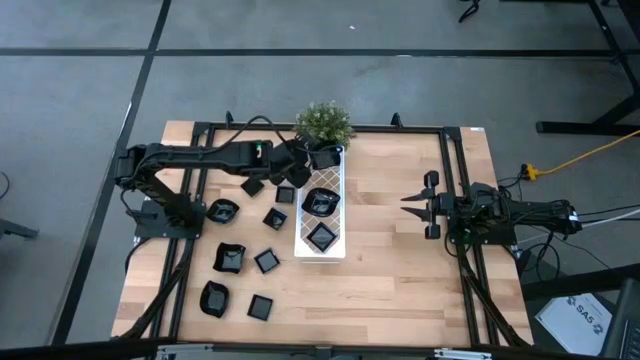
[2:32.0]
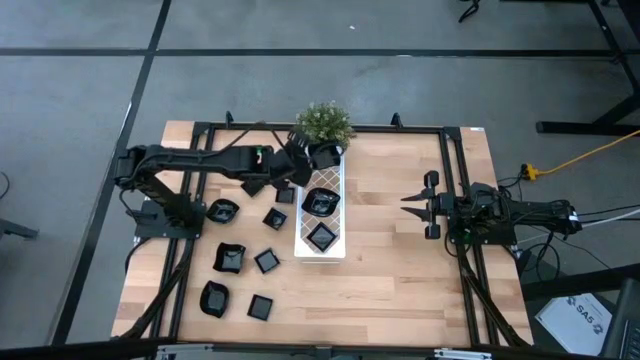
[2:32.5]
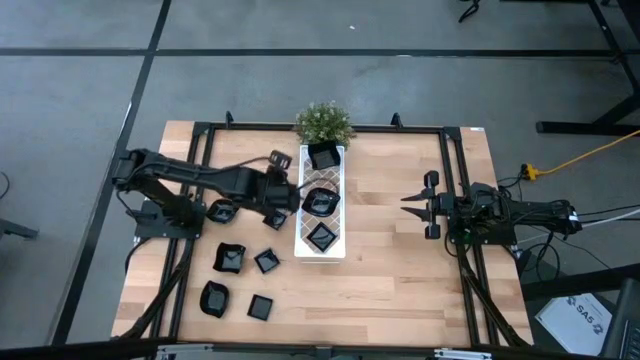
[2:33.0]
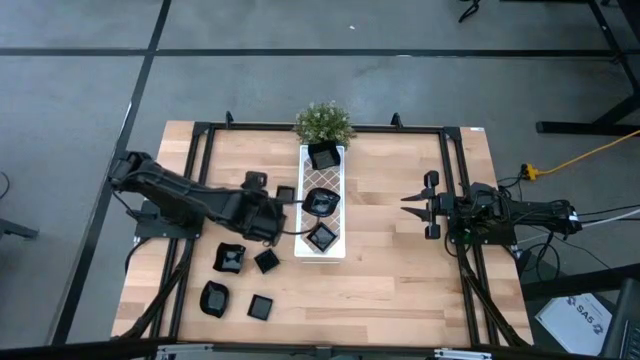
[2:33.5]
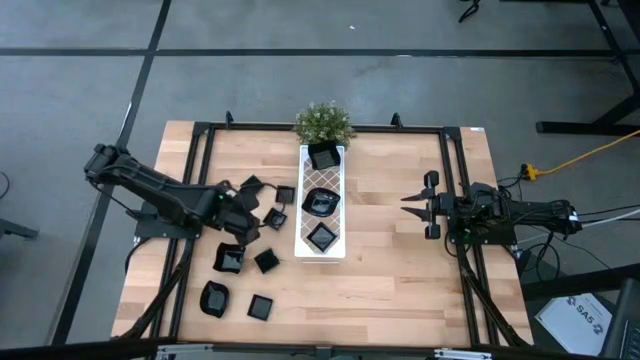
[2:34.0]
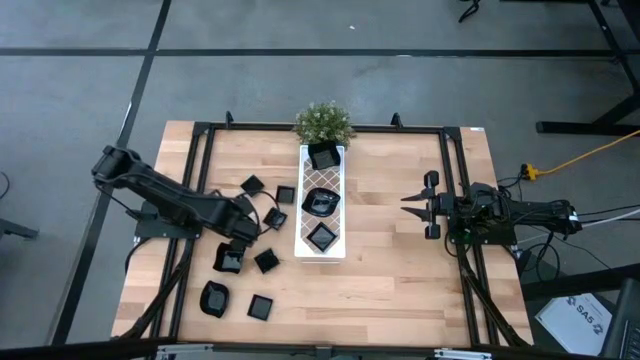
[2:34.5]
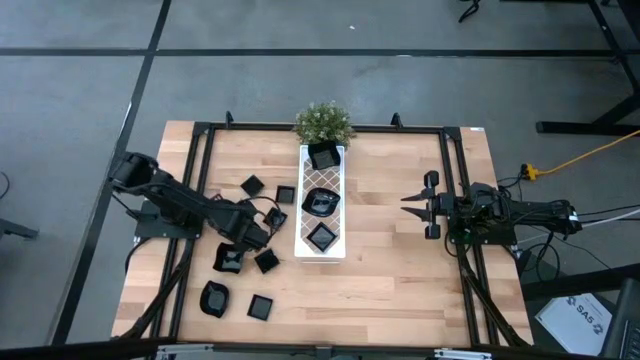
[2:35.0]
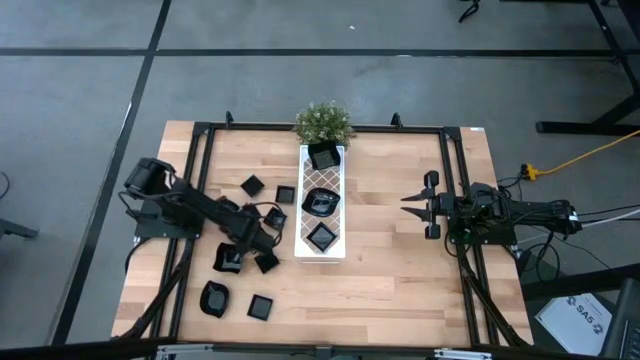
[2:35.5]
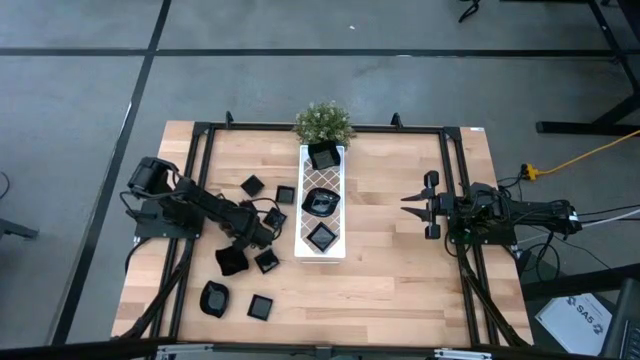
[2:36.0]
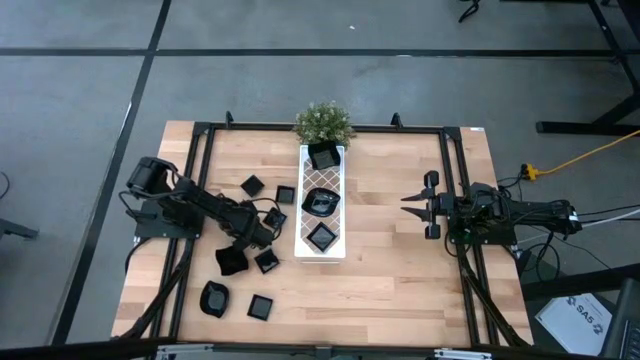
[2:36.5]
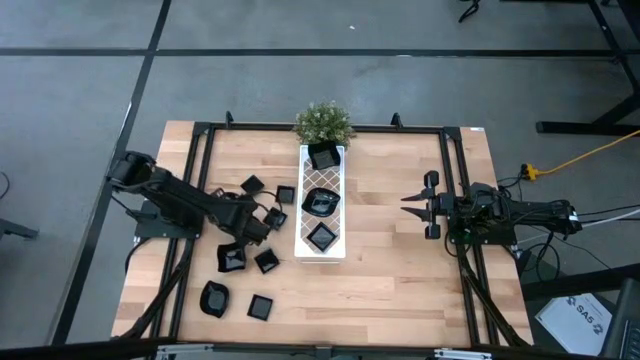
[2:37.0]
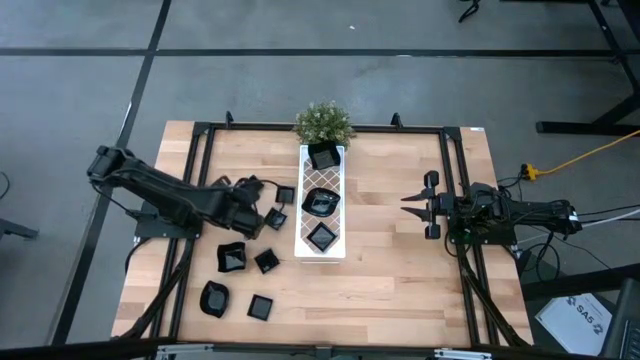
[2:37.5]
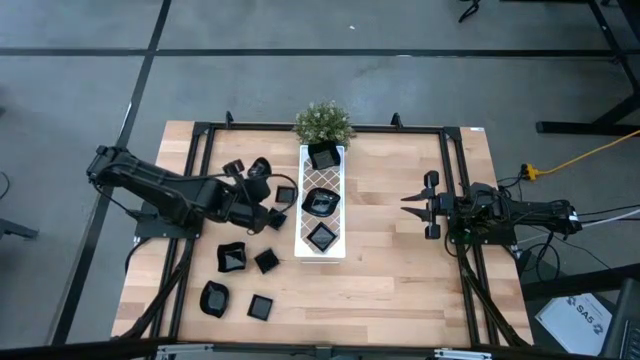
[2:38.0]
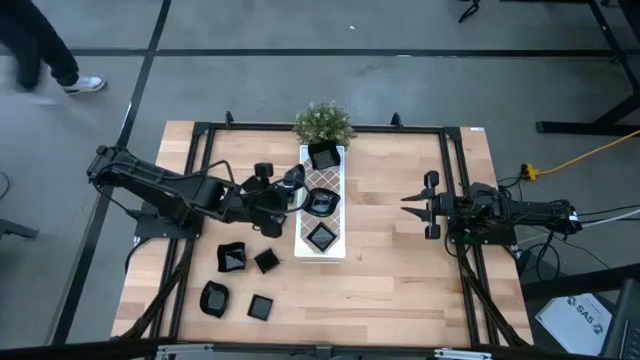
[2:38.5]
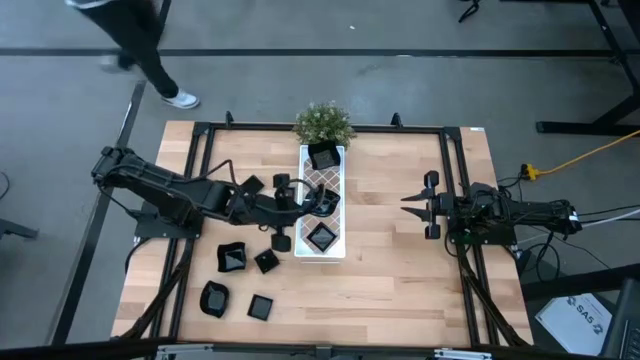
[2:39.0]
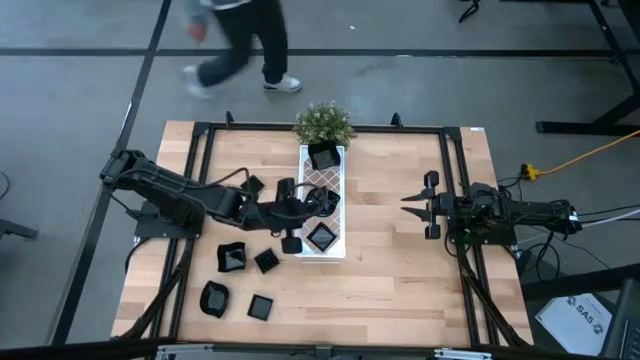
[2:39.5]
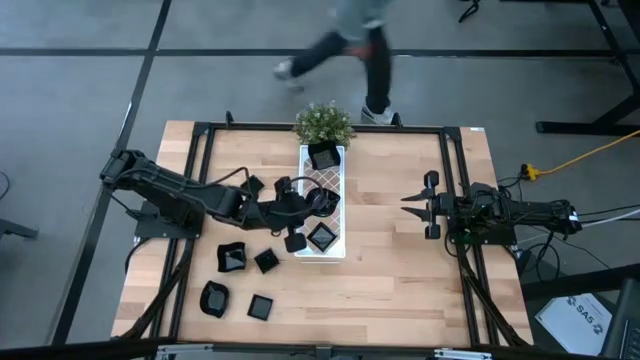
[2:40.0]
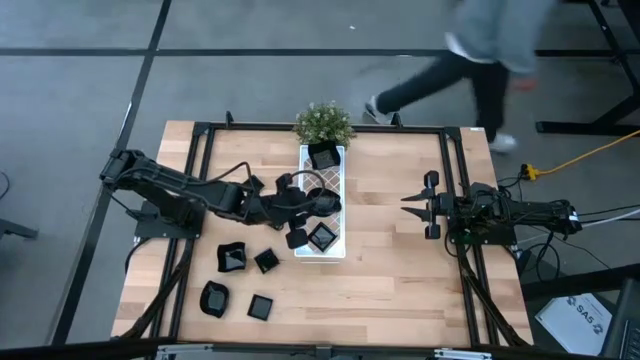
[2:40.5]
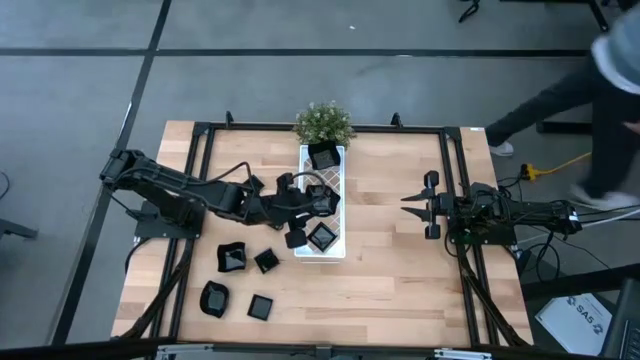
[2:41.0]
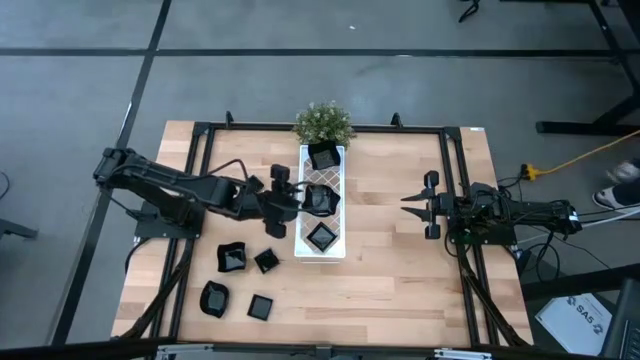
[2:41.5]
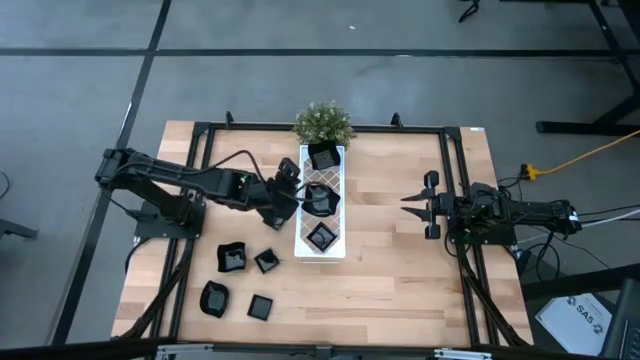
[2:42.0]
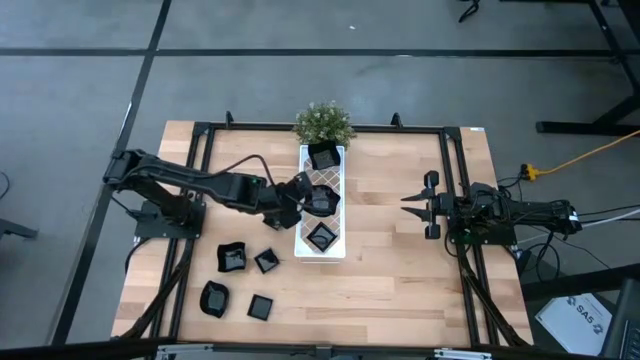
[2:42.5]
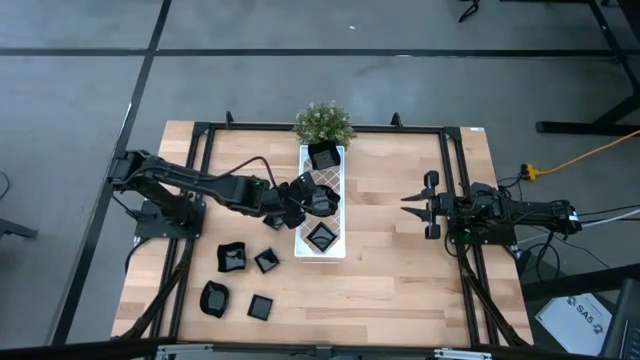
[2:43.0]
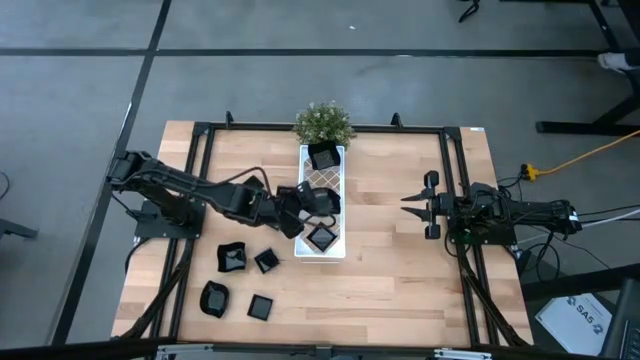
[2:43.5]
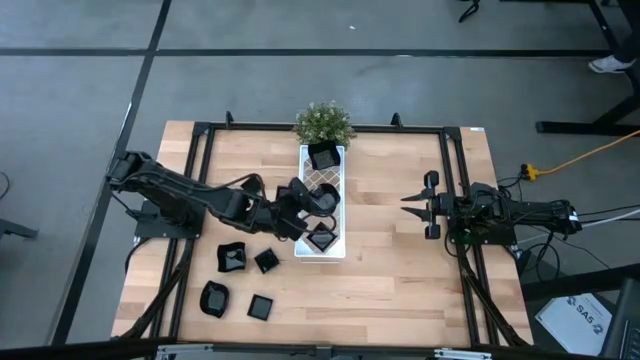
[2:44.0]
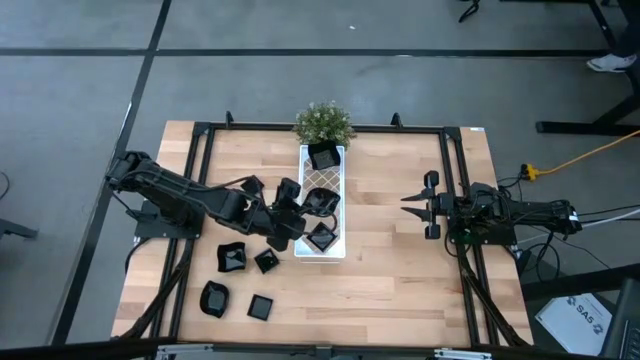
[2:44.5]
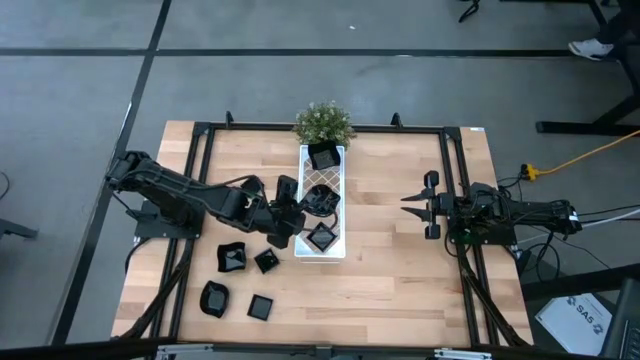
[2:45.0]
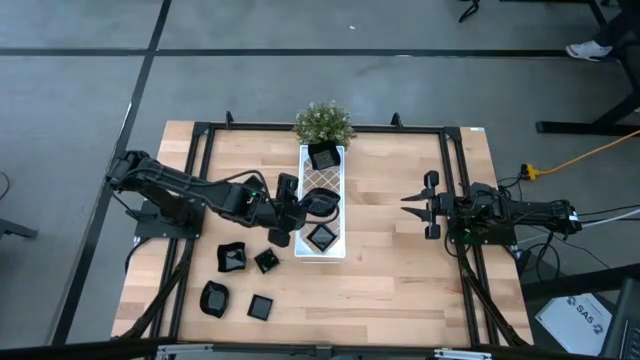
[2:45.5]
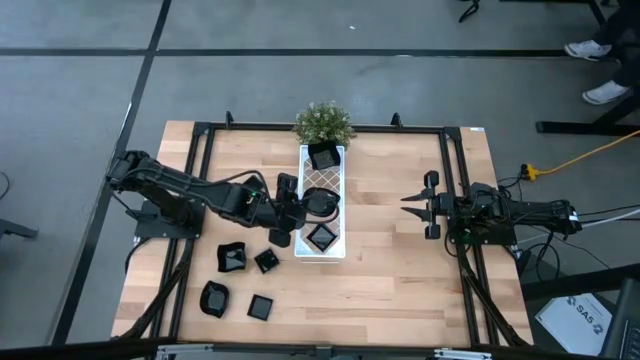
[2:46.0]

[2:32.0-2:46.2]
Task: Pick & Place Mini shaped plates
Stack the leaf shape plate on top of the leaf shape plate on the shelf

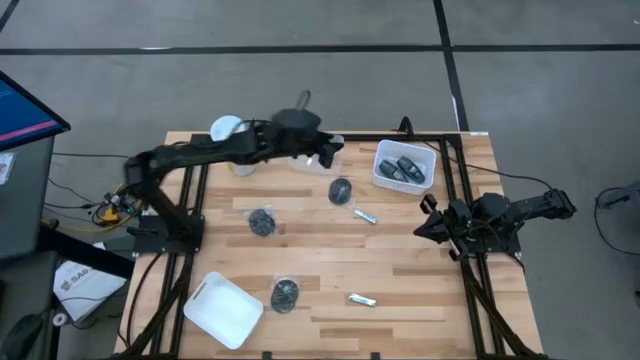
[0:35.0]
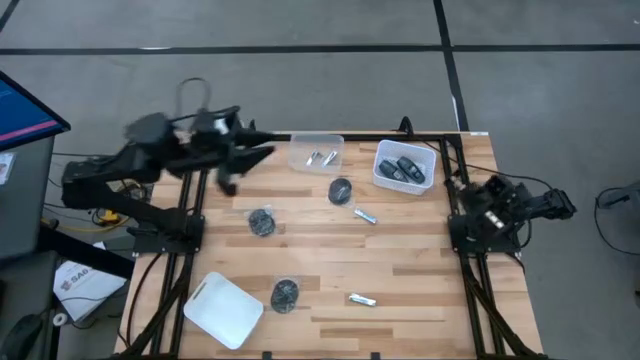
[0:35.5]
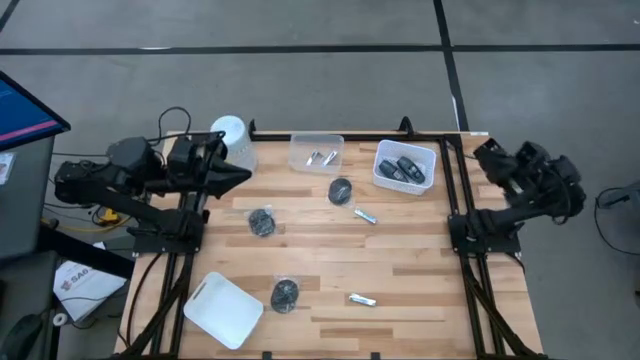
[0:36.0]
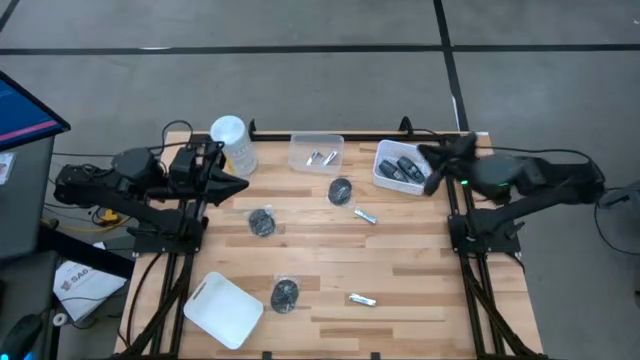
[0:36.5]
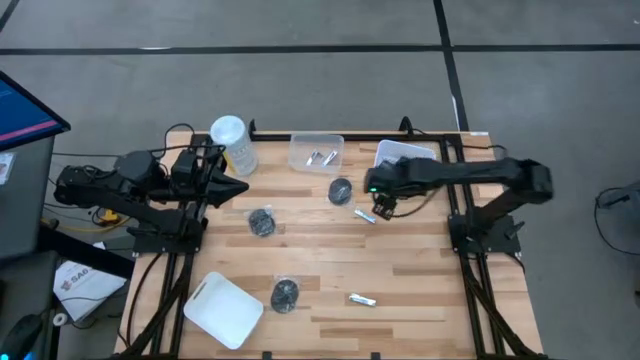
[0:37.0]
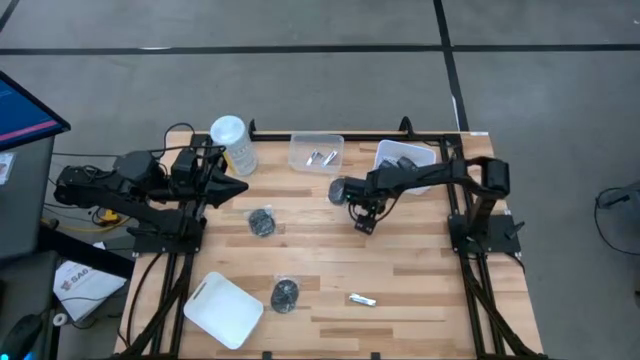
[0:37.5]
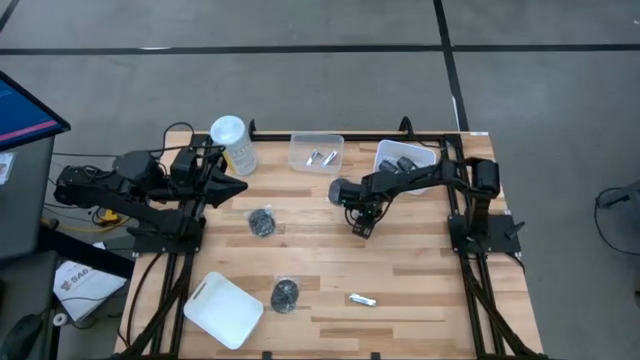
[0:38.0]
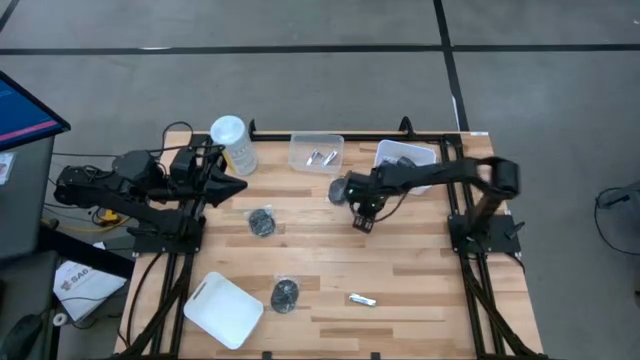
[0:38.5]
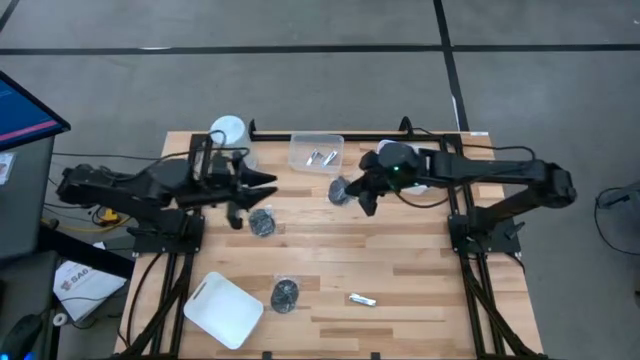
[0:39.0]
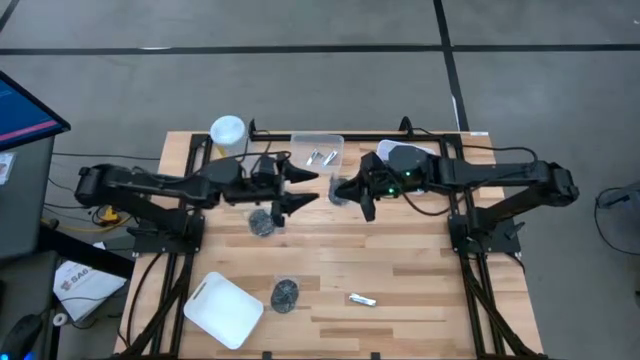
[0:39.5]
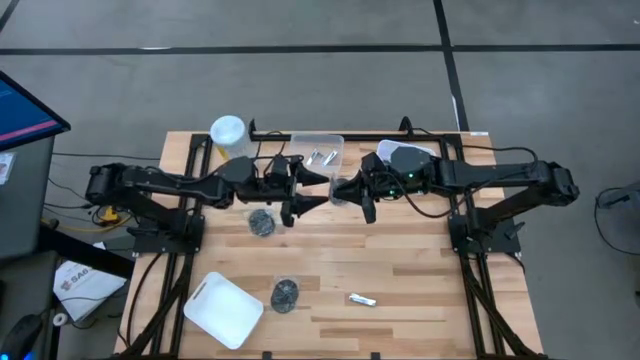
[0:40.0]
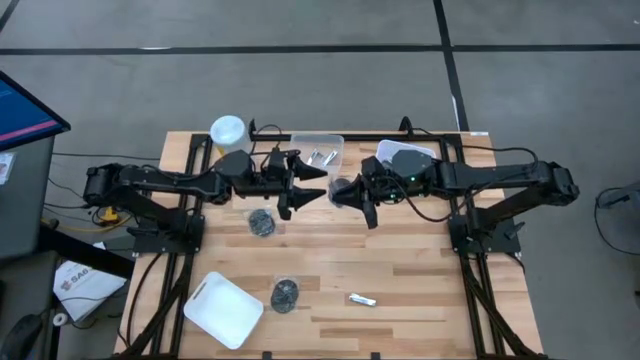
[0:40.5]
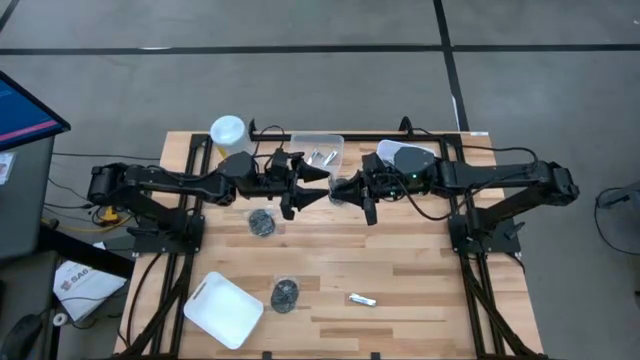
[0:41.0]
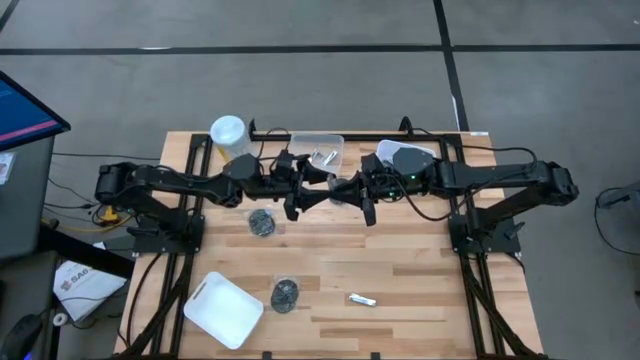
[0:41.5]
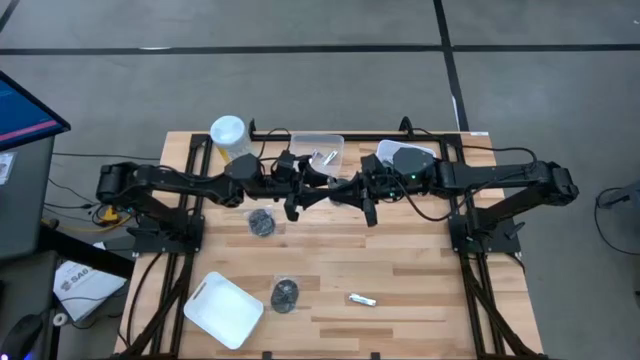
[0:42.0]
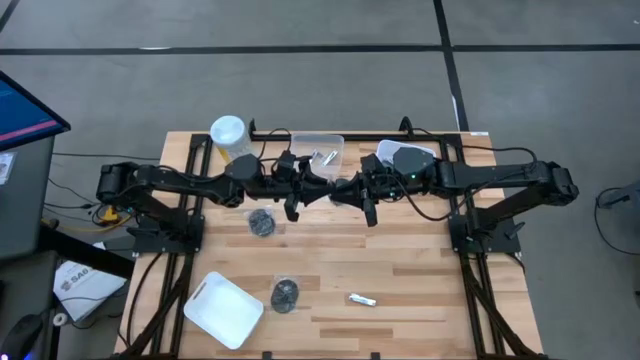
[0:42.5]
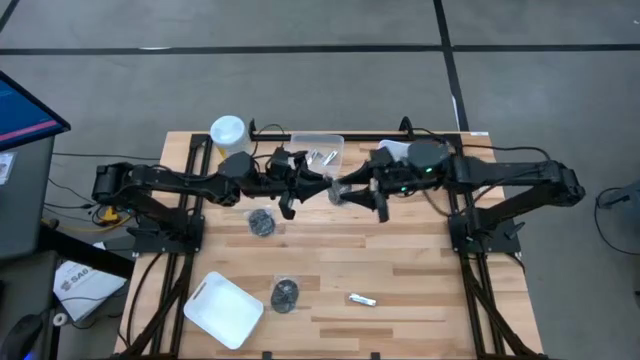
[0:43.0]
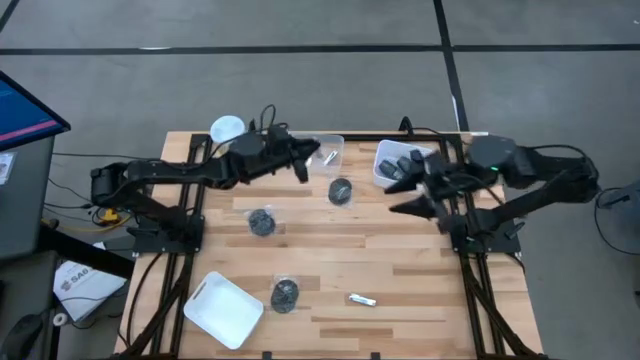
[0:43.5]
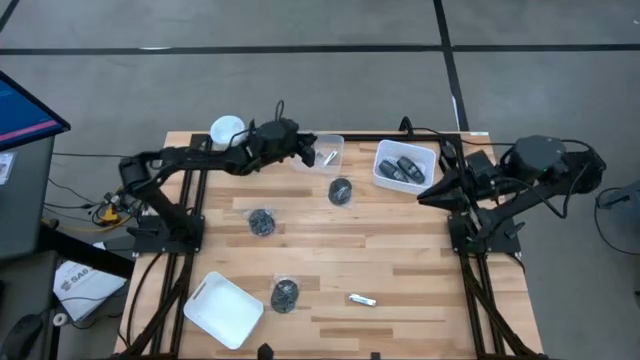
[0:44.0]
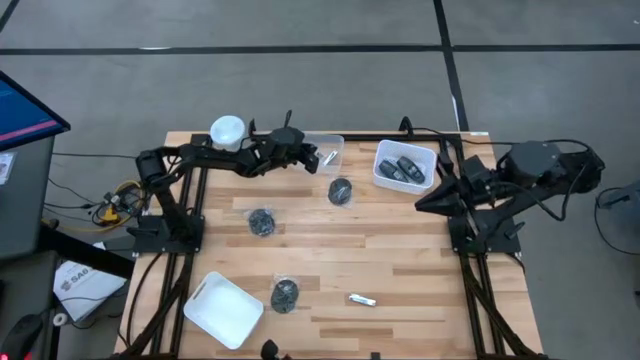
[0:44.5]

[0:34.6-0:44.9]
Task: Pick & Place Travel size toiletries
Put the silver nail cutter into the transparent bin
